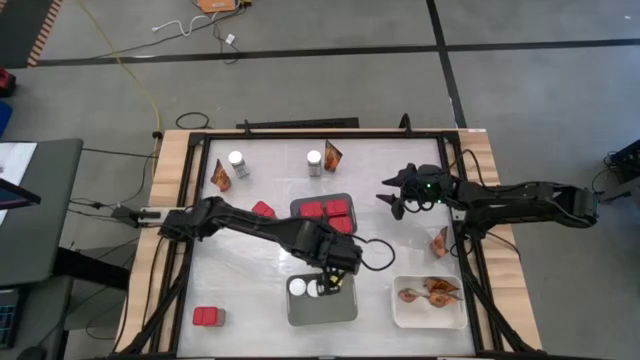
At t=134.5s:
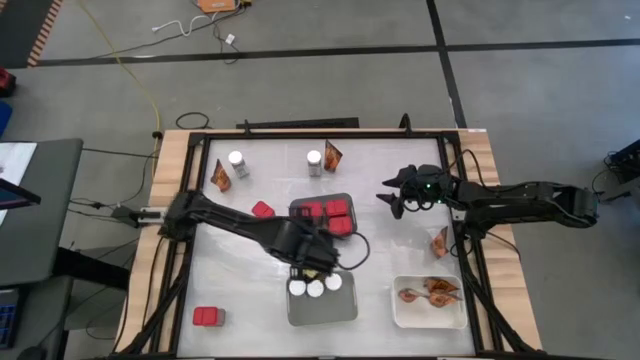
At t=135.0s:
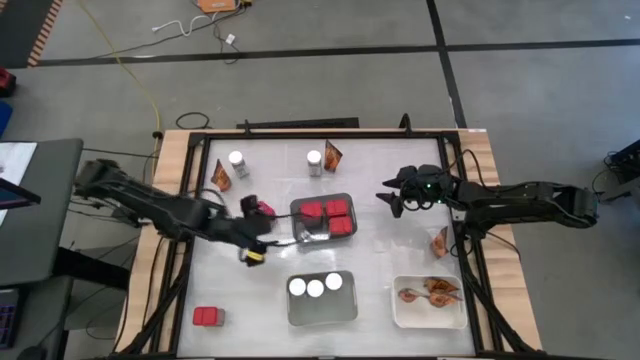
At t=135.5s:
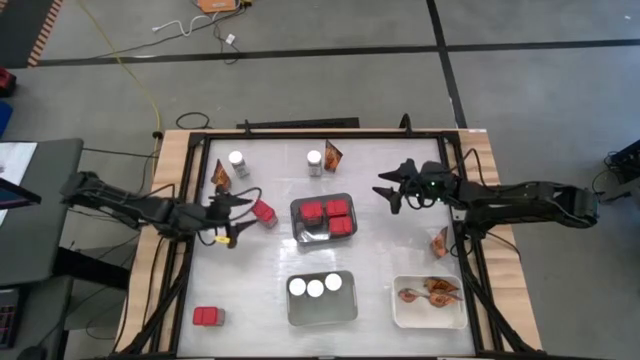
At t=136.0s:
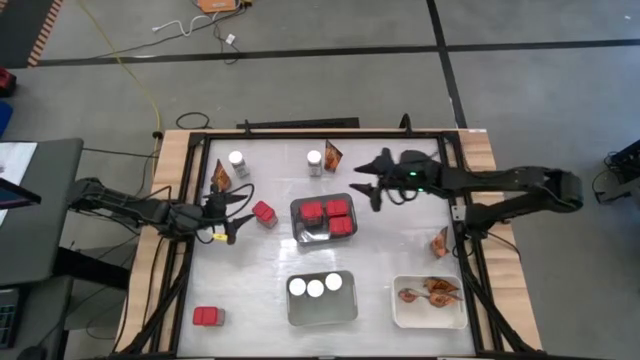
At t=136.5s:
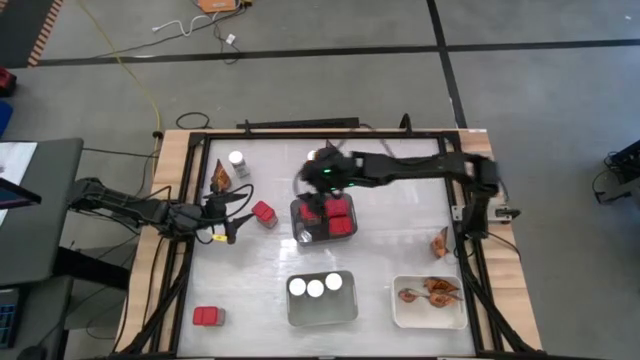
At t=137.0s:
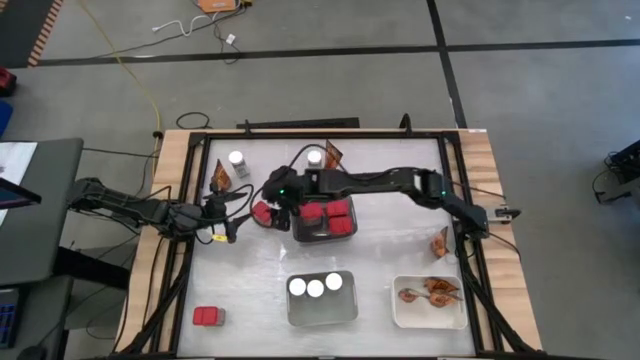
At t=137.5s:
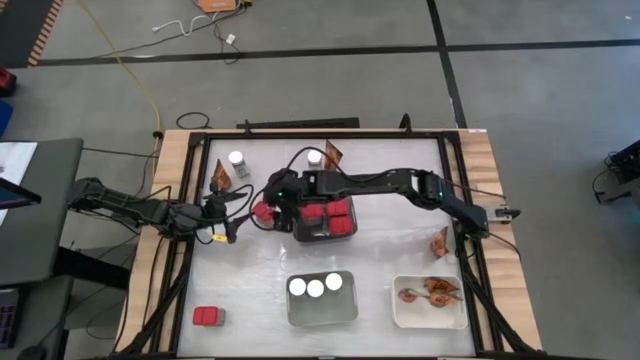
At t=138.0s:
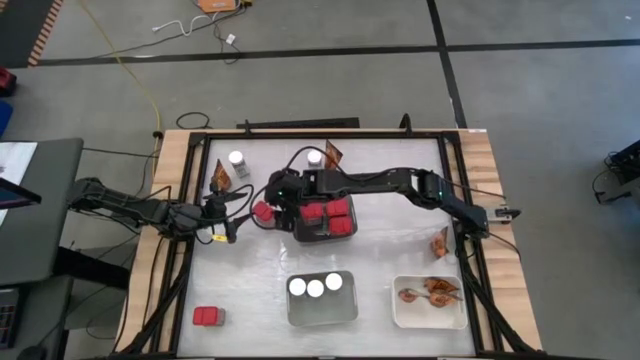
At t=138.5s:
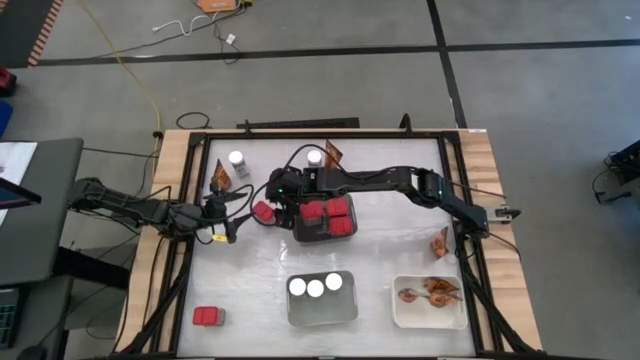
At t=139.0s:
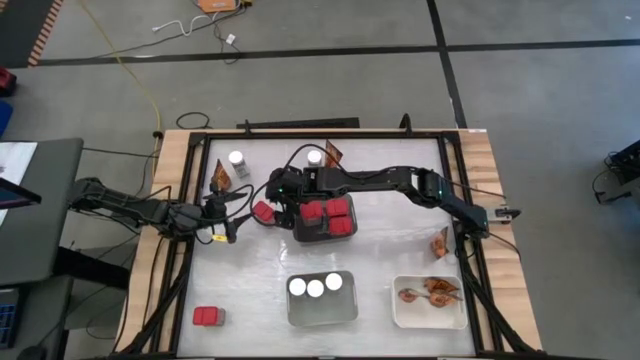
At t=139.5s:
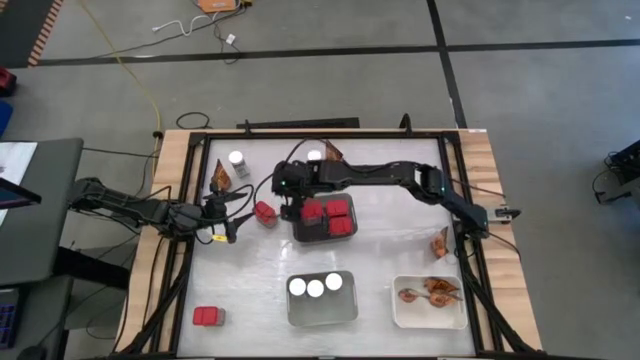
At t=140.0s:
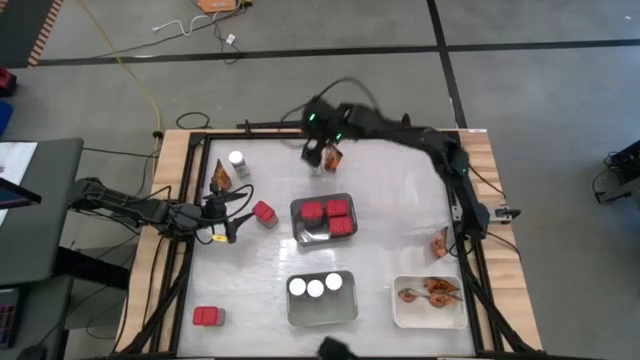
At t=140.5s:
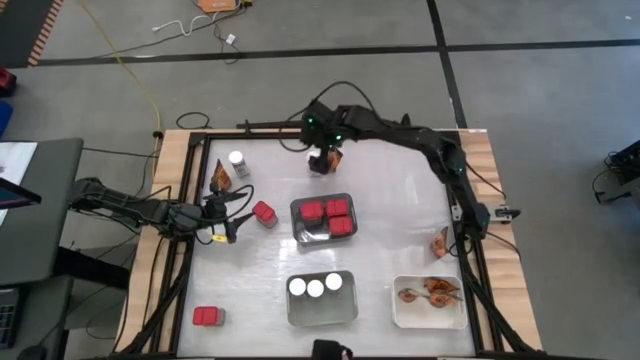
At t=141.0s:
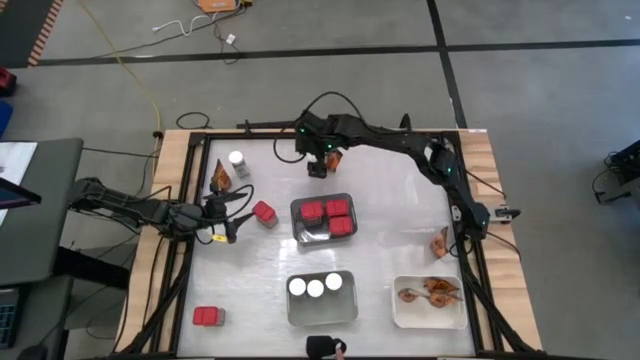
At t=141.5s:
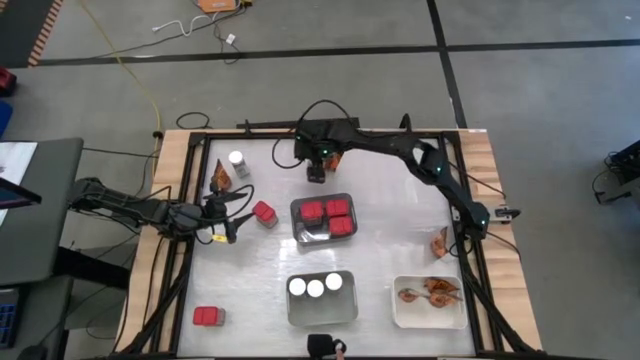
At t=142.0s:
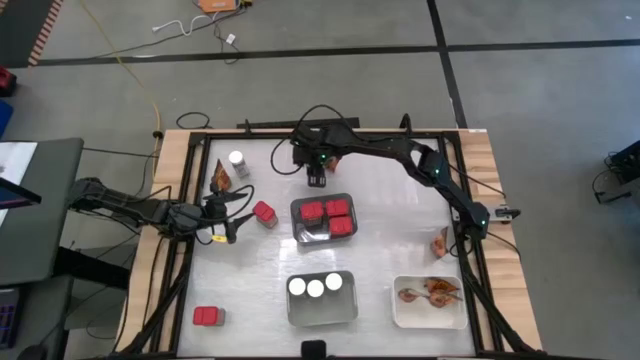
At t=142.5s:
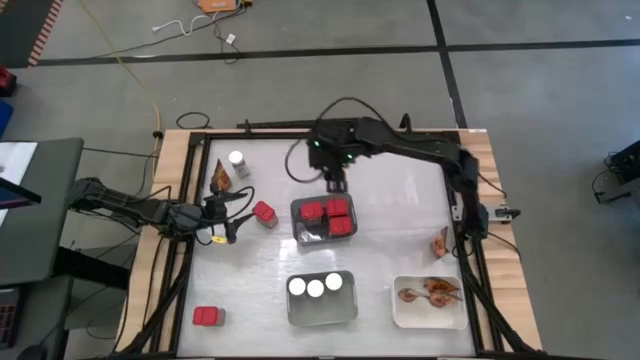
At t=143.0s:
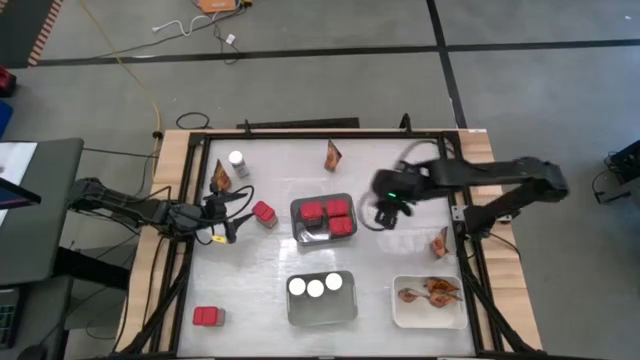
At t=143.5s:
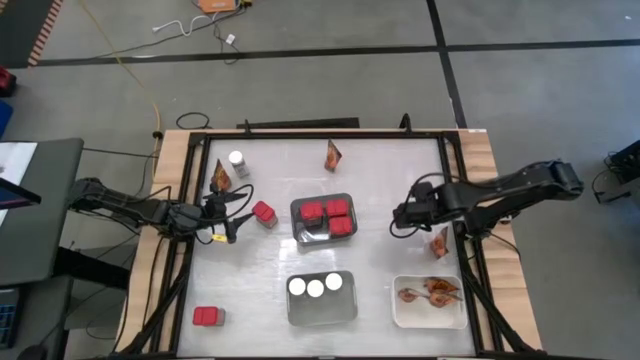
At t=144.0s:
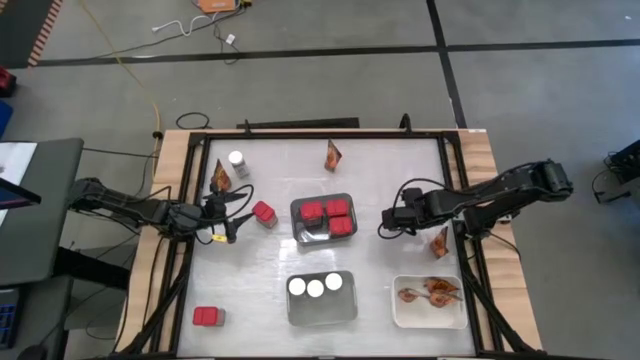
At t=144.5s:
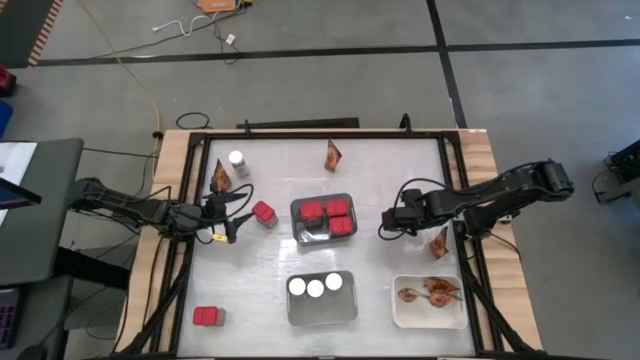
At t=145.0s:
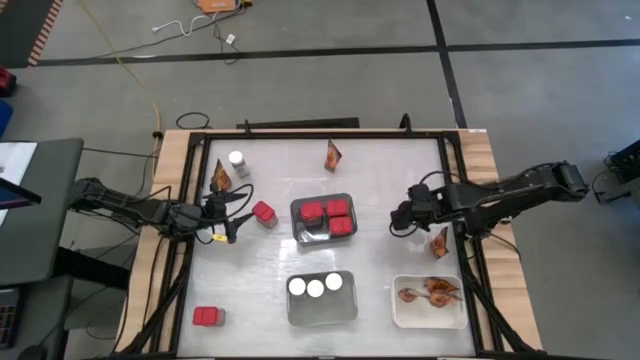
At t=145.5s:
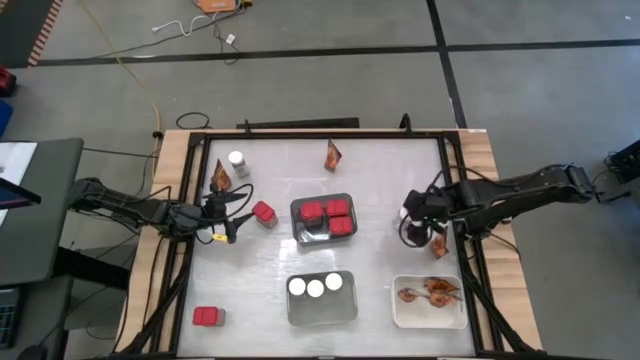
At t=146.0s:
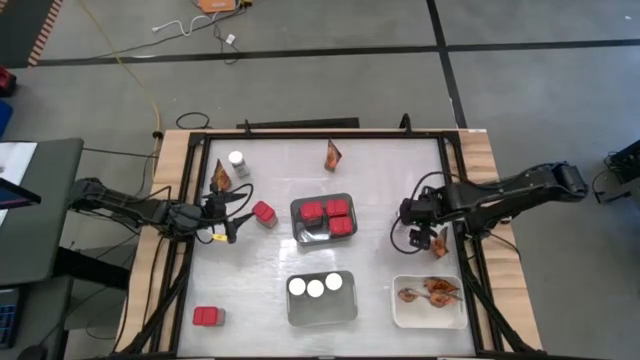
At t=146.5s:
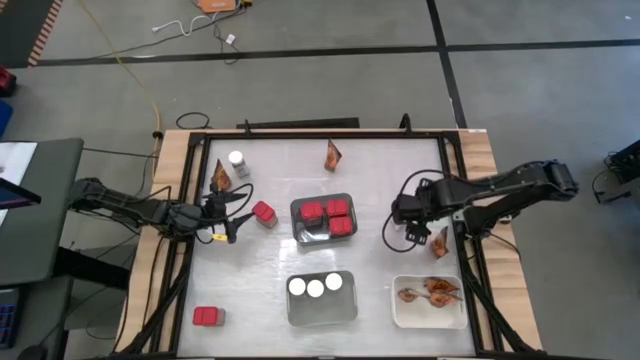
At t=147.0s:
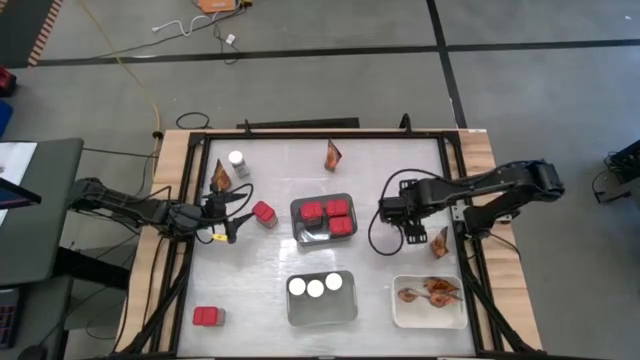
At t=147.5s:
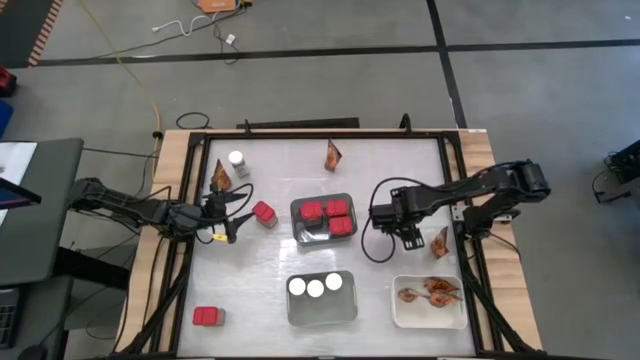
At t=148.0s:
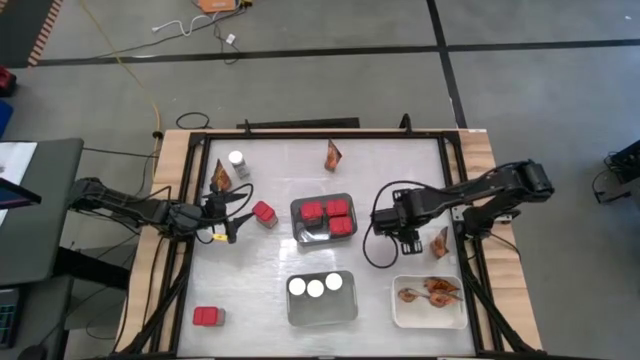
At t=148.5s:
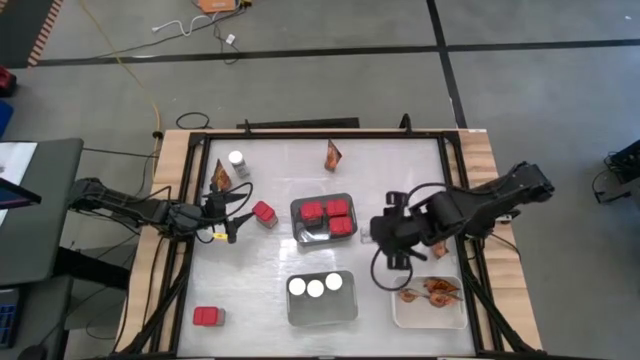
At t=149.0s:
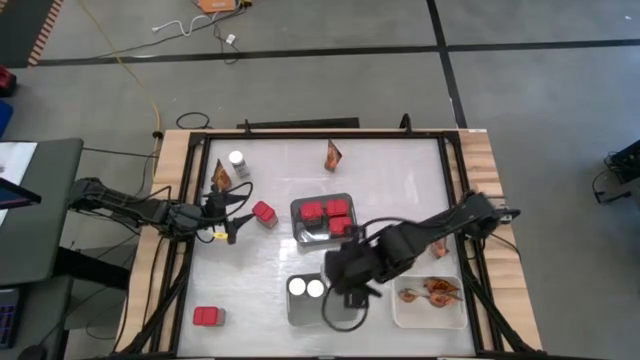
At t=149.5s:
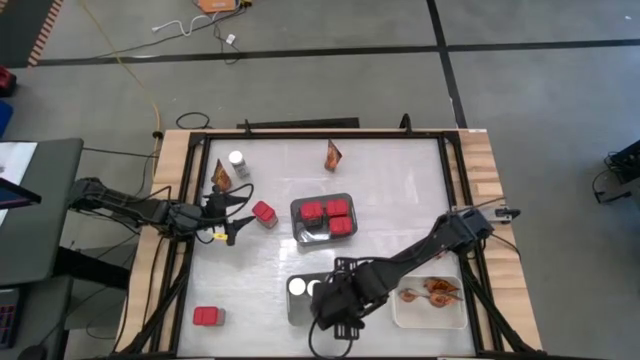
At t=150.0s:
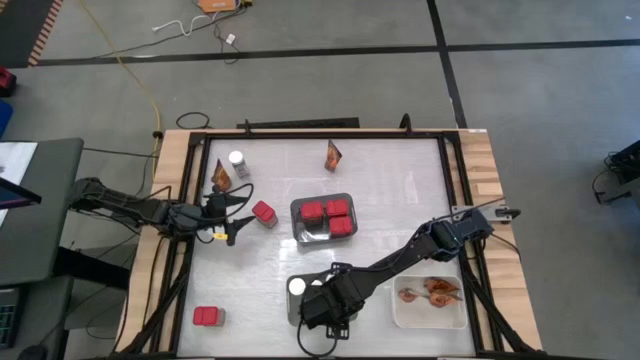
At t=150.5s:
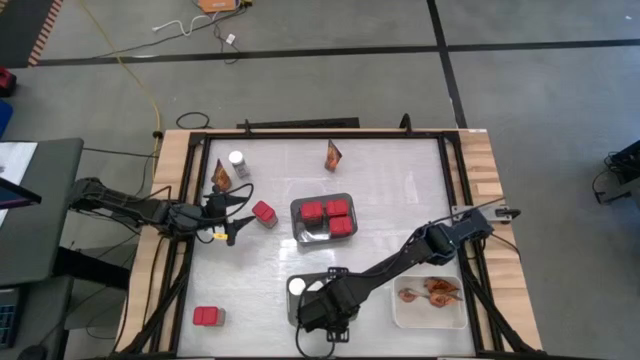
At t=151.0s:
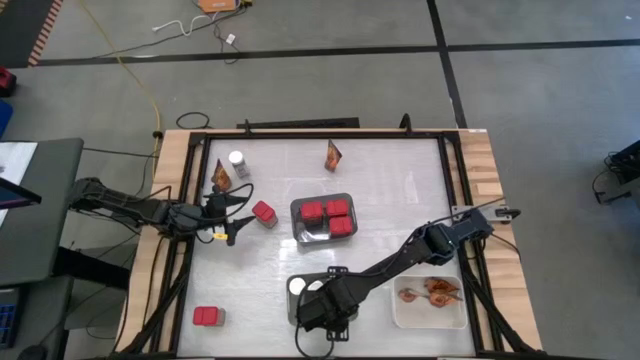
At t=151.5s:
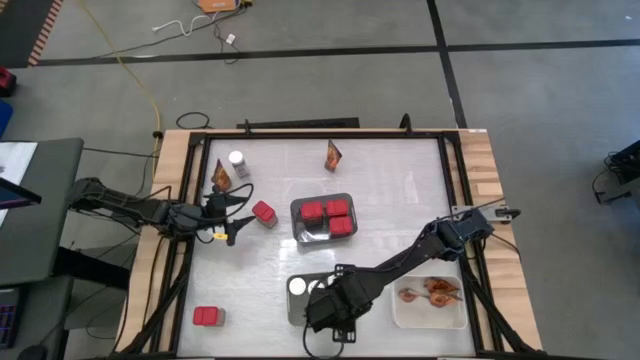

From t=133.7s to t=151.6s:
Task: Sort spices by type
Put the white seasoning bottle into the gray bin

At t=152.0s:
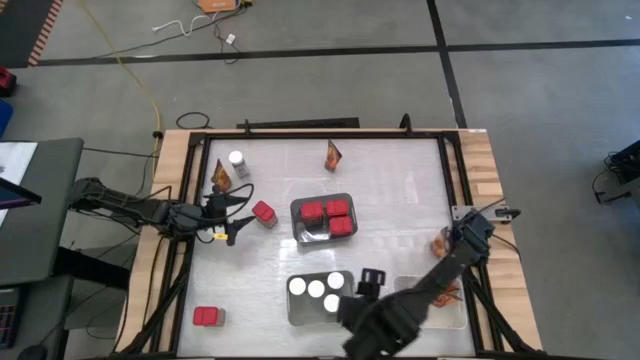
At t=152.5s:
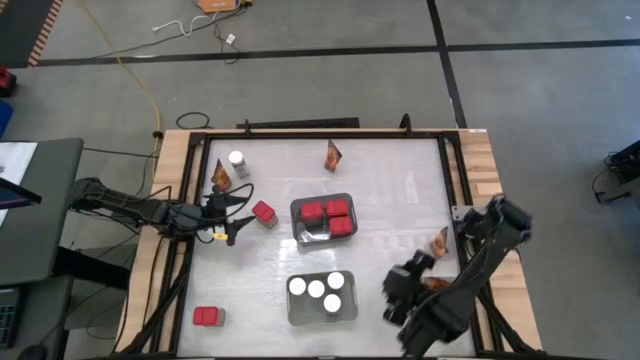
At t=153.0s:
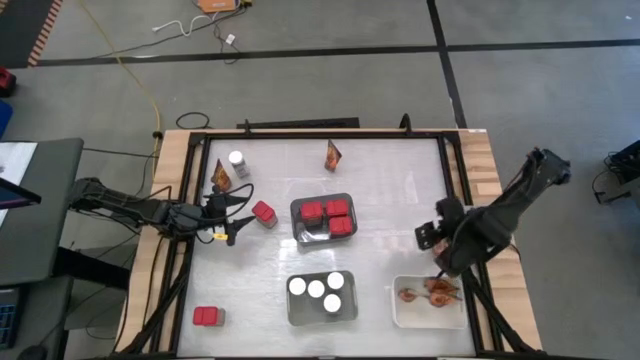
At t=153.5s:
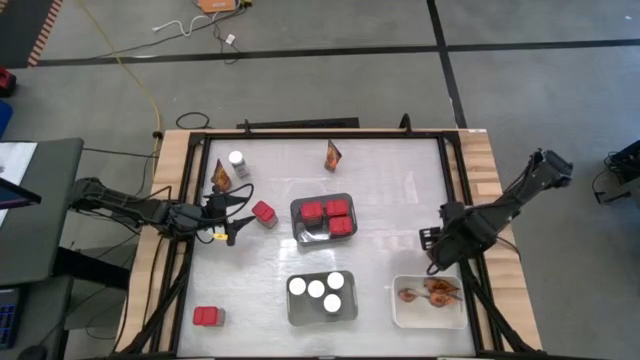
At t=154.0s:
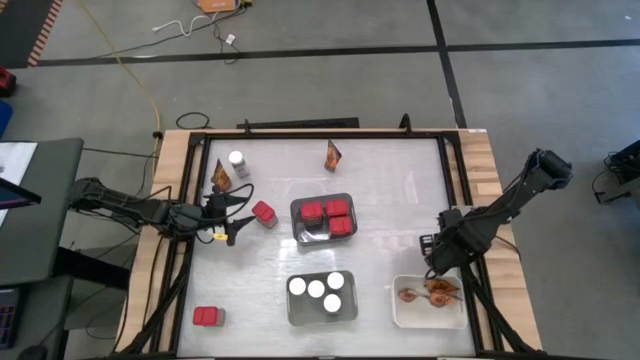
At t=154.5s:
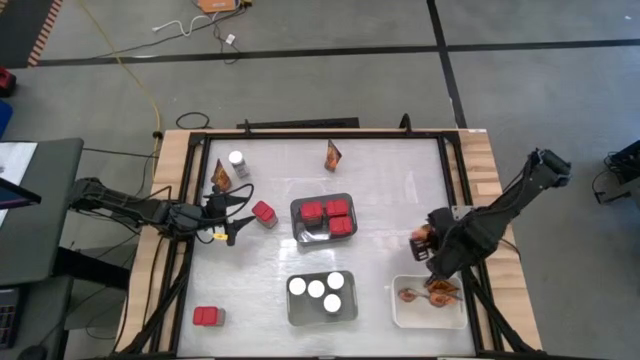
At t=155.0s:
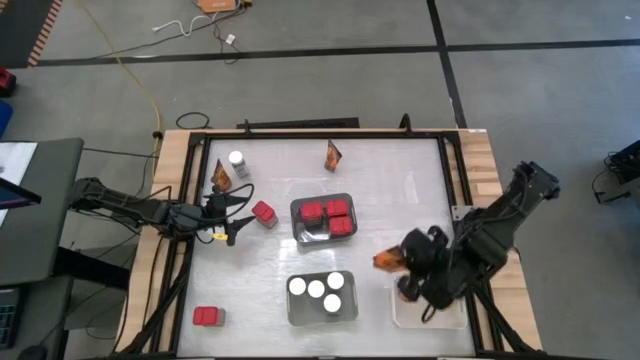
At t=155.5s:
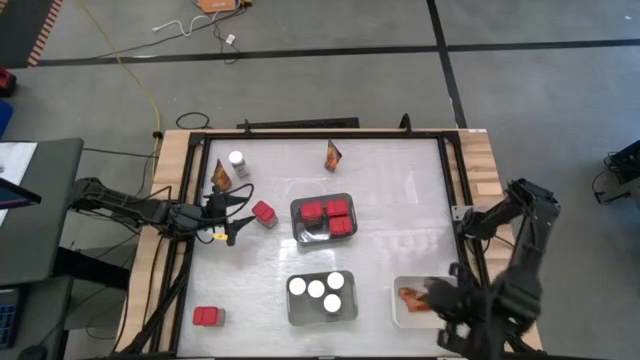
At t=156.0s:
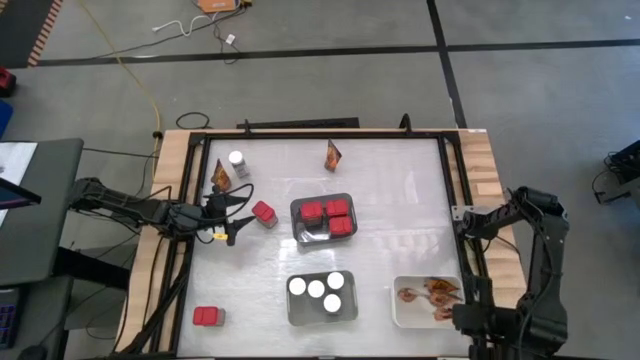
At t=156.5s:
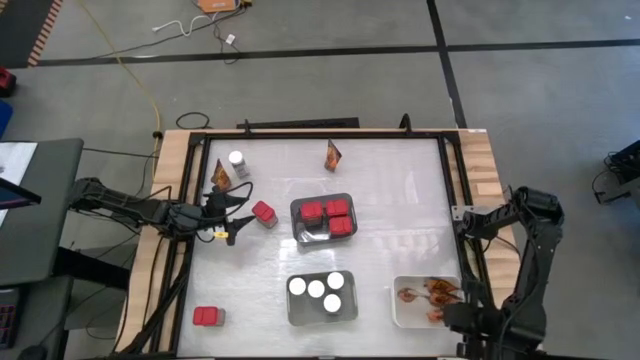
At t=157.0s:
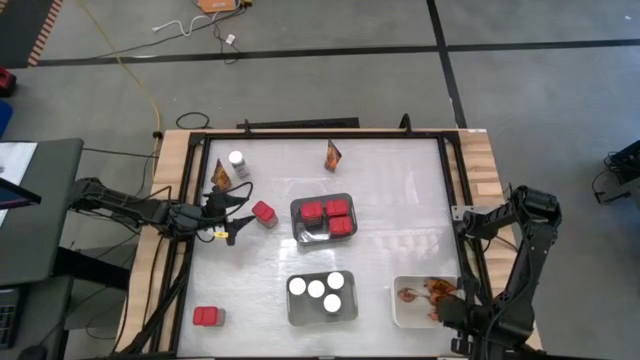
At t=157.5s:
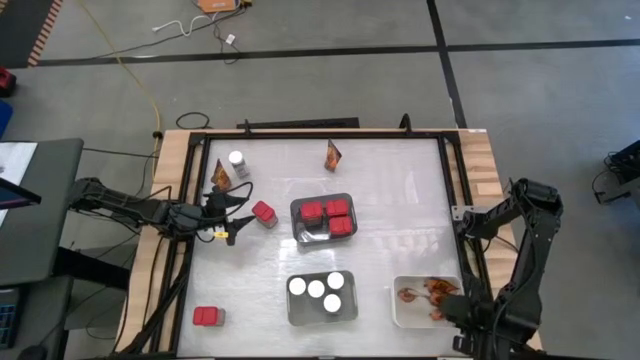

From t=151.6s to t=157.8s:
Put the orange seasoning pack into the white bin
